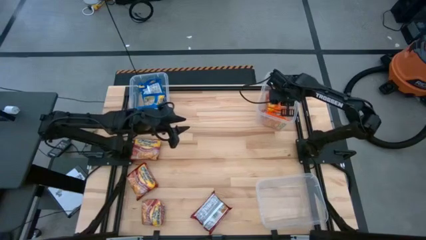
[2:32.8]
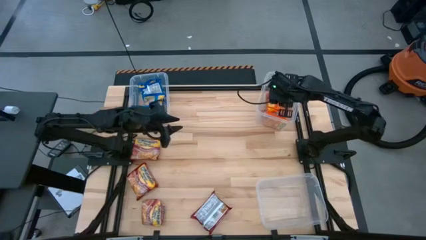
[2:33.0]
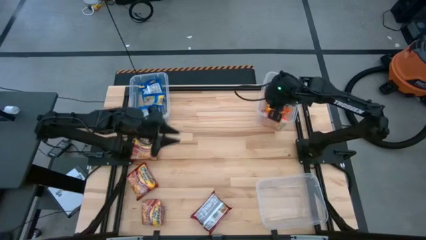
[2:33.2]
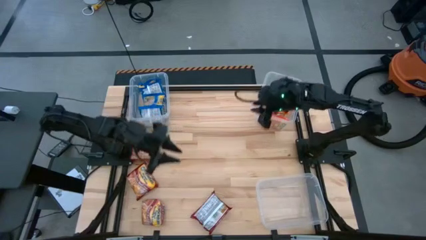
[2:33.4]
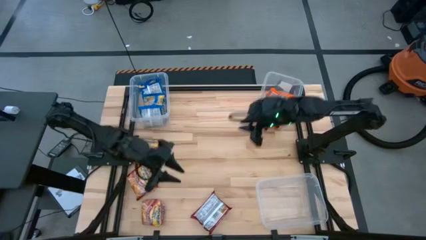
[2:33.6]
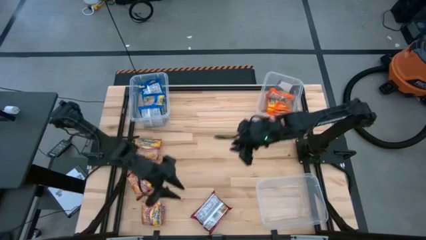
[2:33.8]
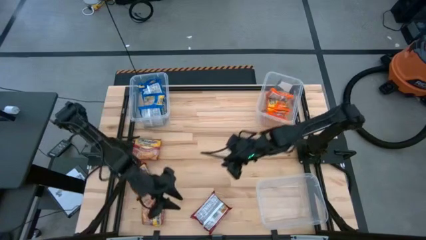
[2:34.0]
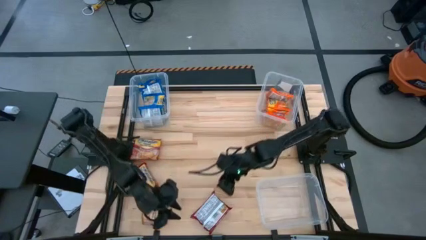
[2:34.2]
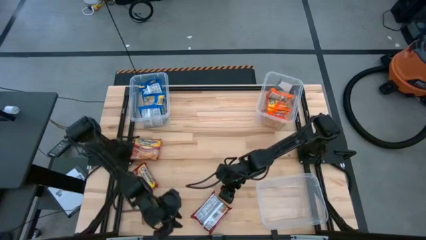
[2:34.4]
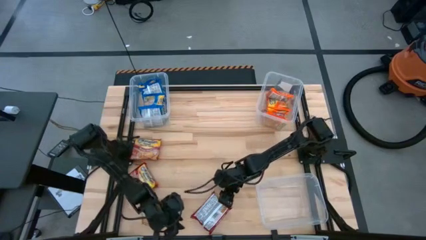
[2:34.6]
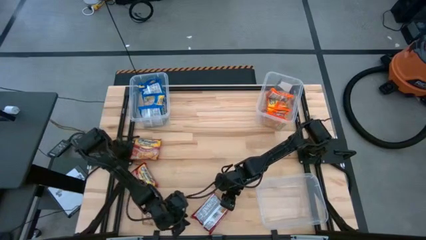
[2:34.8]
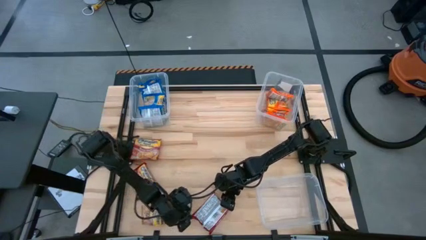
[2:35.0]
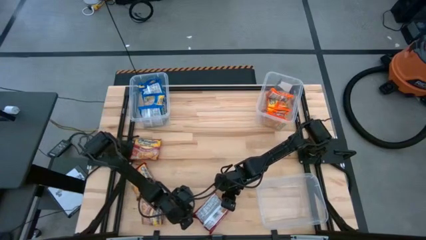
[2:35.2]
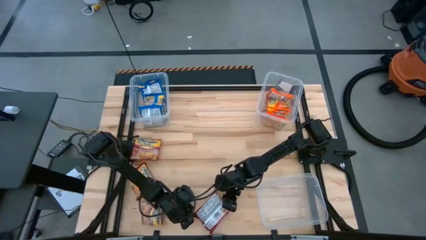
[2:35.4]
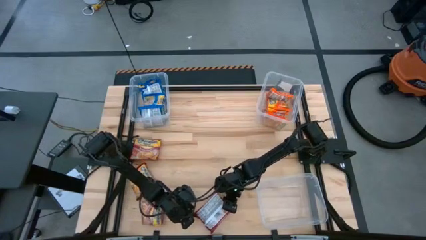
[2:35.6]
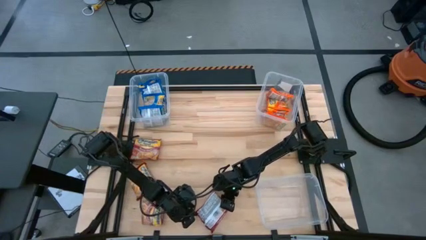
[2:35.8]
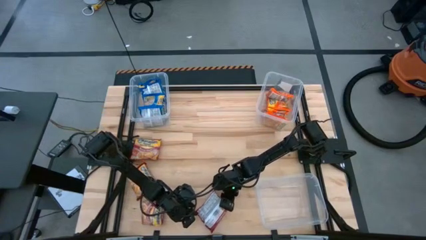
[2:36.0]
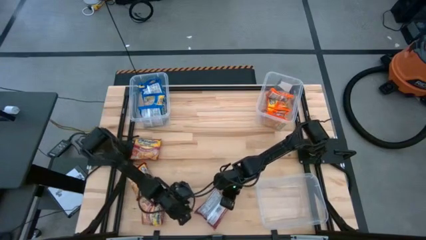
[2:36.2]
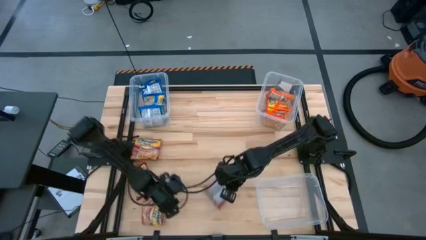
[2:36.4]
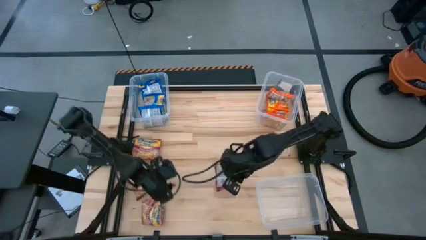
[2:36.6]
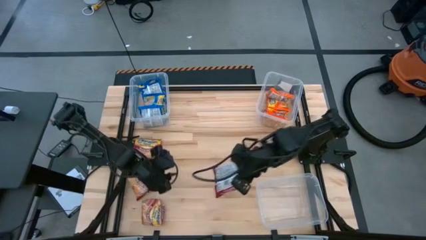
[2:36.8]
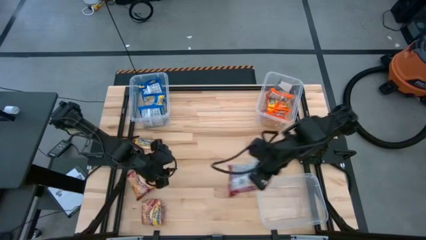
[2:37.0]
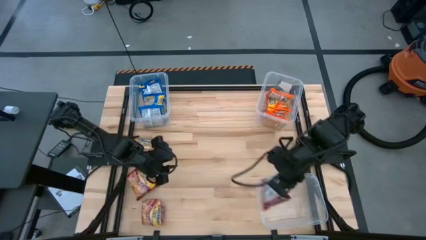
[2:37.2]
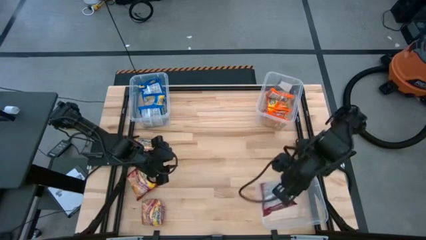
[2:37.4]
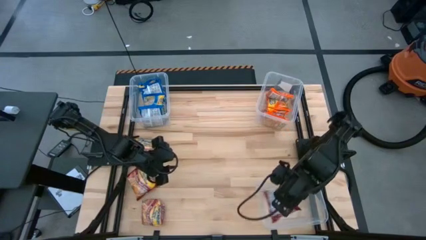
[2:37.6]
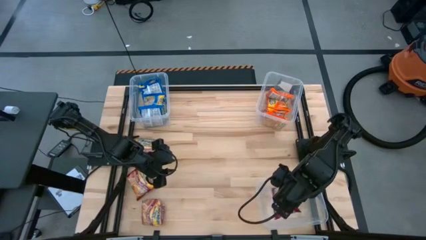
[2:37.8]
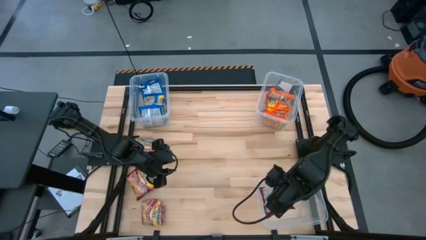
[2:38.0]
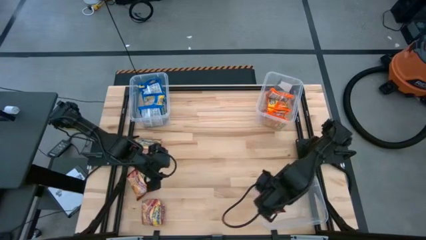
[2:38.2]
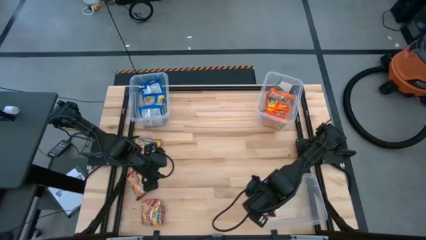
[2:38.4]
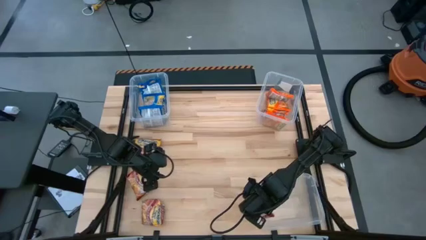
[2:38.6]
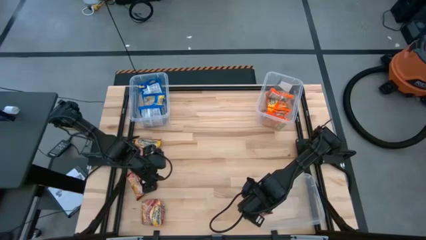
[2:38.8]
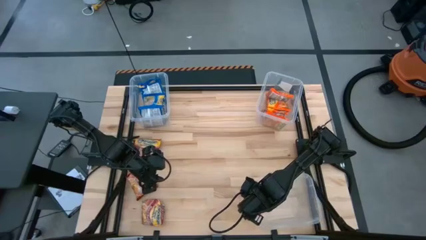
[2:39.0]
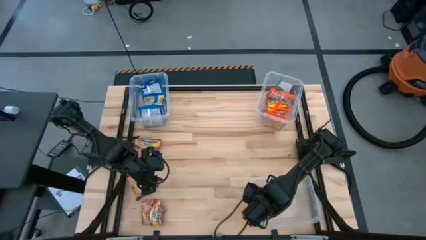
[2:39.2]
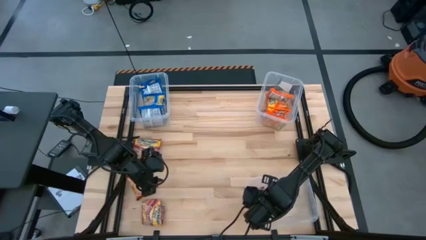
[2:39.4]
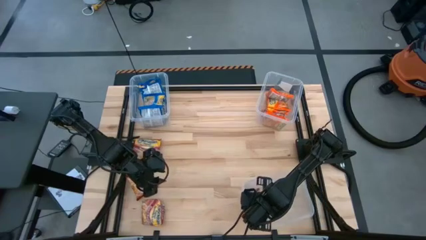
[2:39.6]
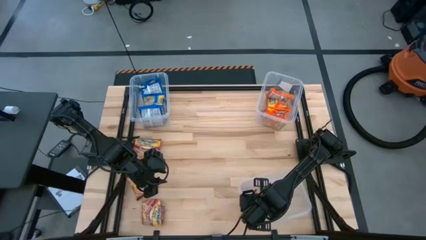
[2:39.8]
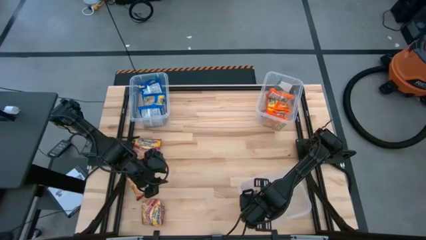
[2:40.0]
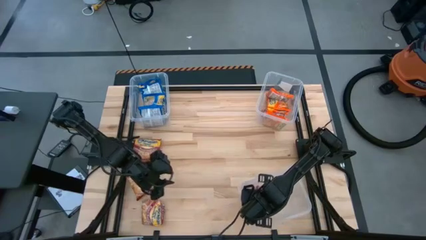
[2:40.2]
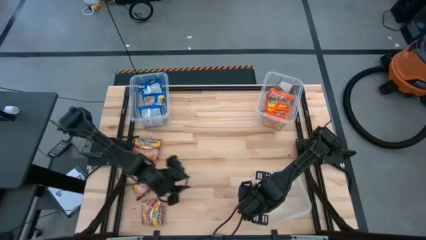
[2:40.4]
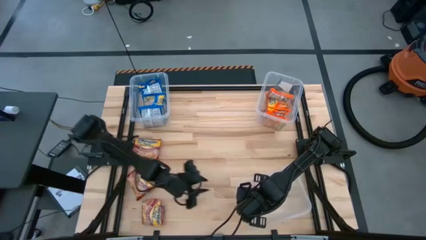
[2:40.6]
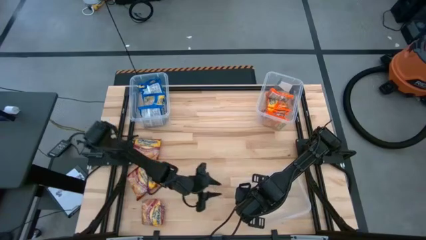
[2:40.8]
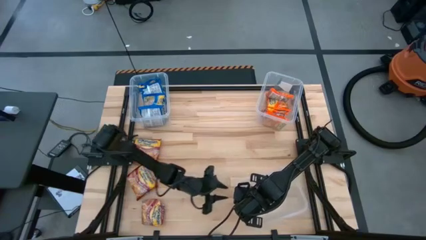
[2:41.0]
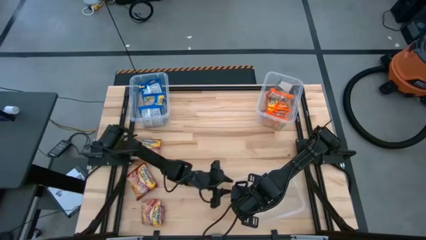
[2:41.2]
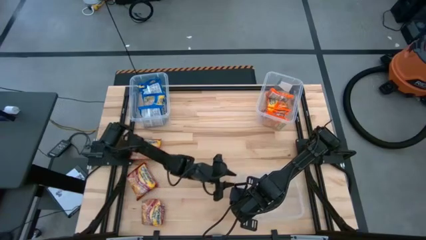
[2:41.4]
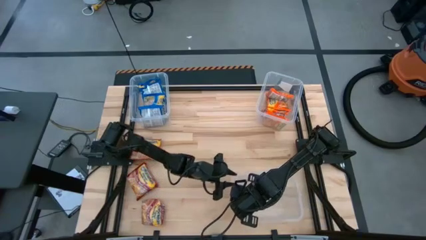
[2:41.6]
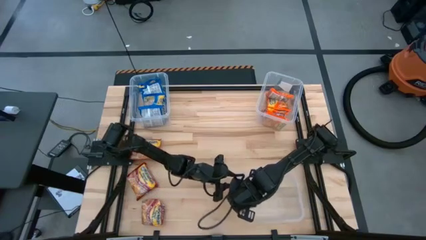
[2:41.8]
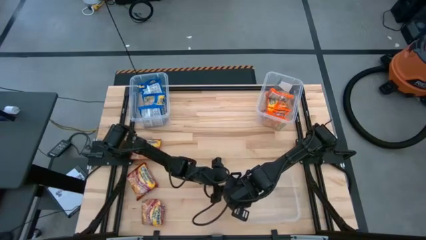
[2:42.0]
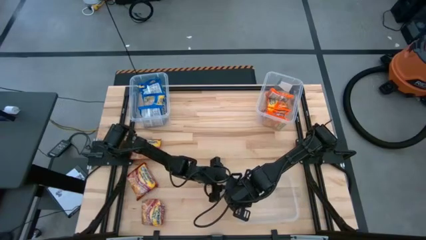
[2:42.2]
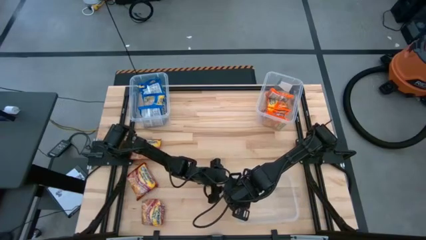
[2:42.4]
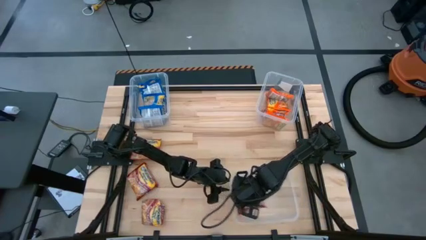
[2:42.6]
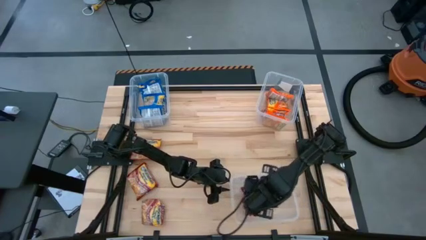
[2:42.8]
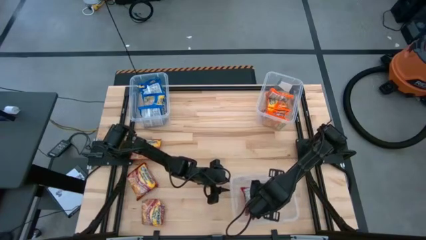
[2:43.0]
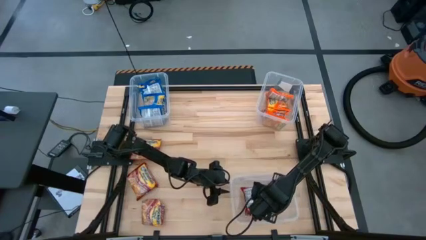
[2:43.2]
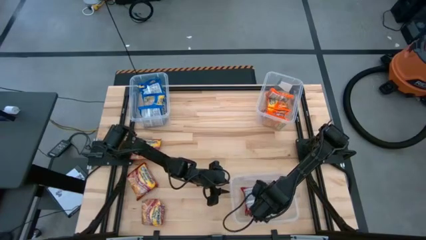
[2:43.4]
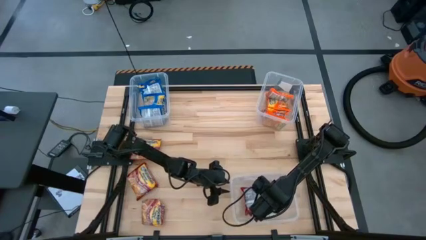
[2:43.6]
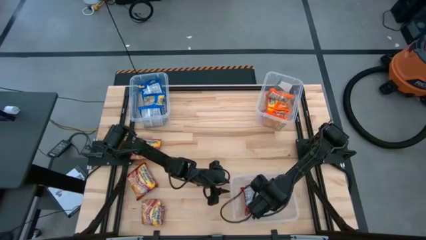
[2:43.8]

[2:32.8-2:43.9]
Task: Sort Maruchan noodles
Put the red noodle pack into the bottom transparent bin
